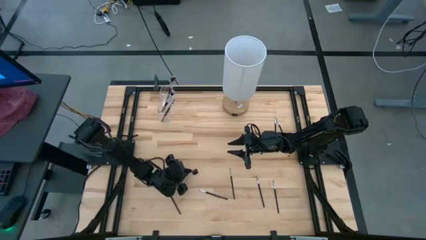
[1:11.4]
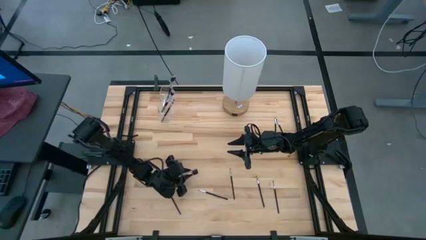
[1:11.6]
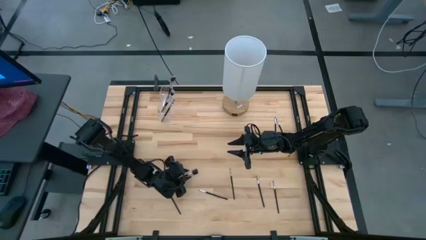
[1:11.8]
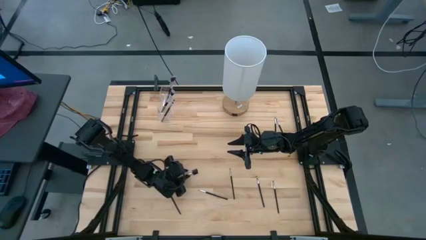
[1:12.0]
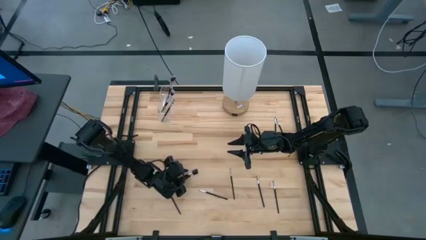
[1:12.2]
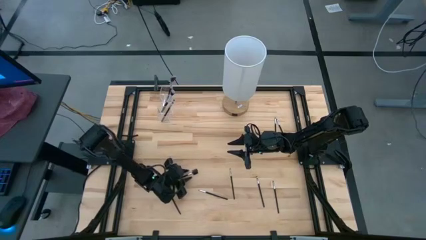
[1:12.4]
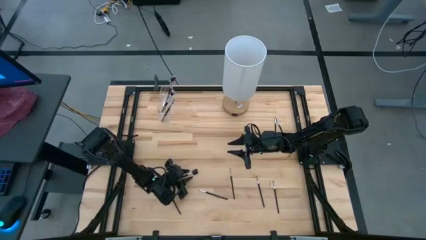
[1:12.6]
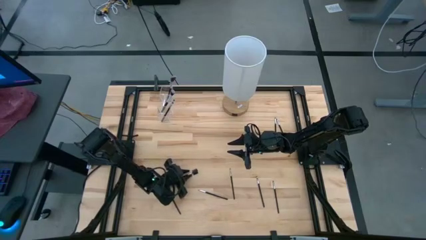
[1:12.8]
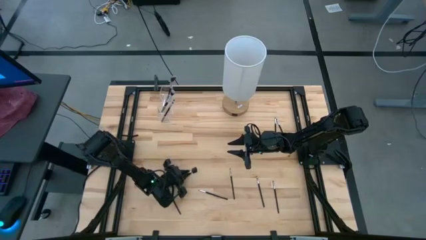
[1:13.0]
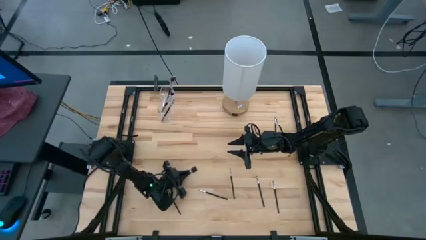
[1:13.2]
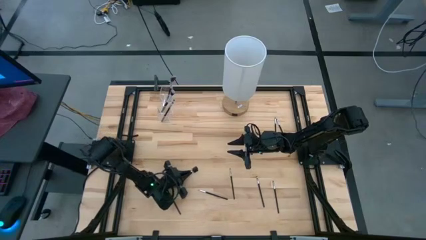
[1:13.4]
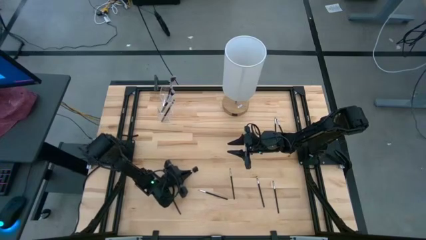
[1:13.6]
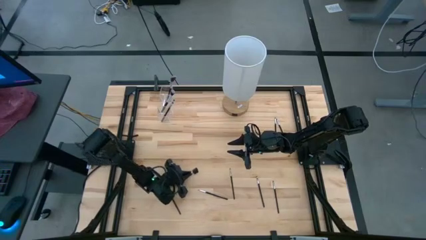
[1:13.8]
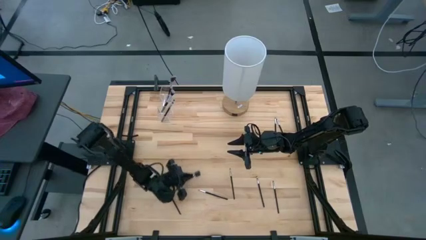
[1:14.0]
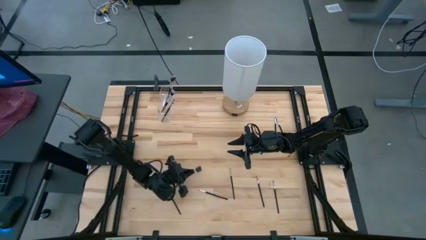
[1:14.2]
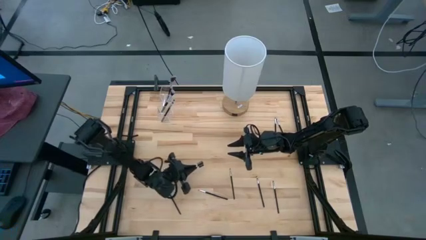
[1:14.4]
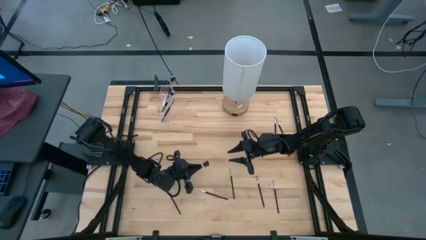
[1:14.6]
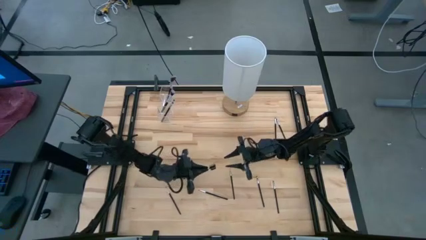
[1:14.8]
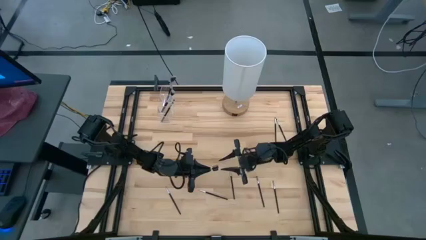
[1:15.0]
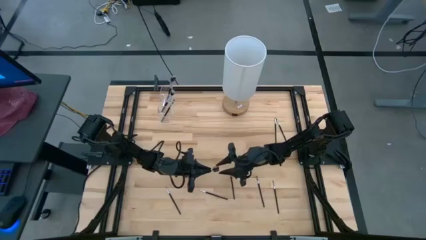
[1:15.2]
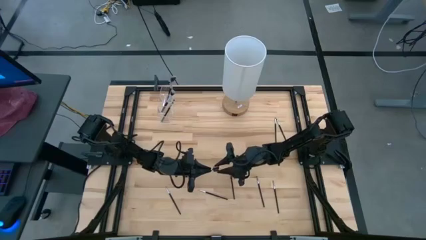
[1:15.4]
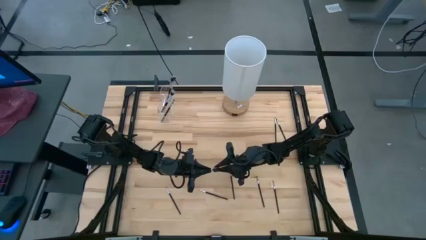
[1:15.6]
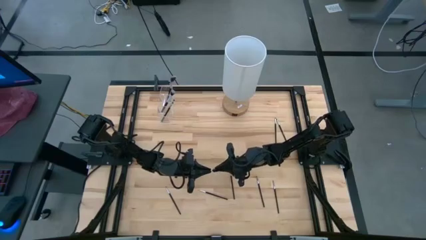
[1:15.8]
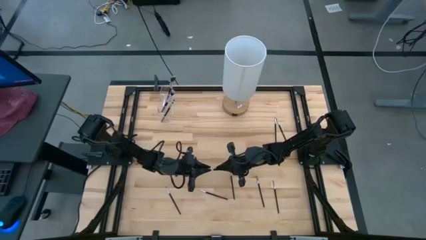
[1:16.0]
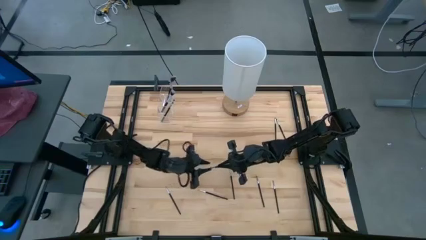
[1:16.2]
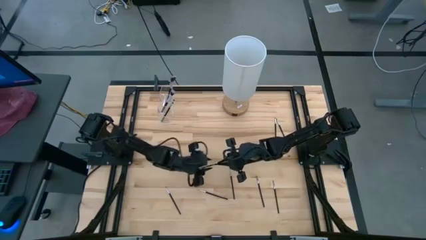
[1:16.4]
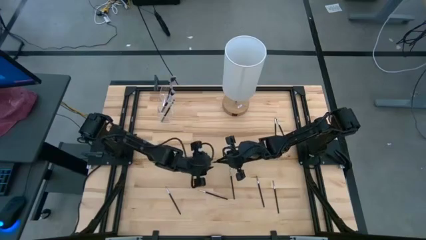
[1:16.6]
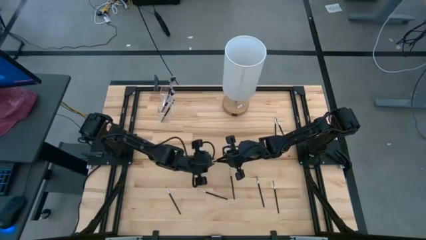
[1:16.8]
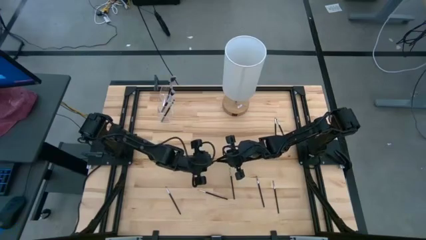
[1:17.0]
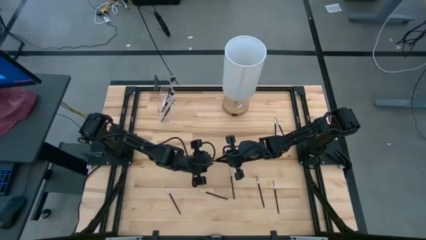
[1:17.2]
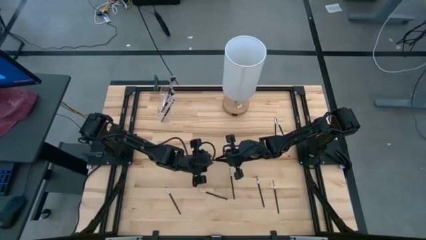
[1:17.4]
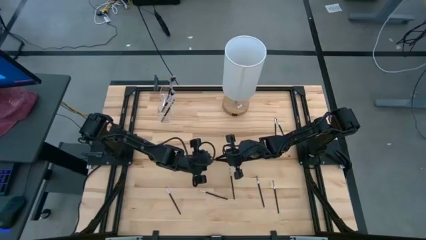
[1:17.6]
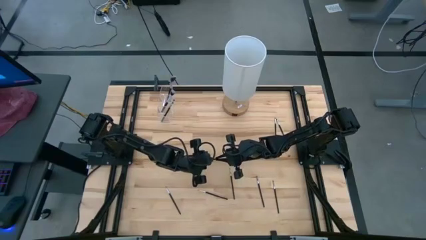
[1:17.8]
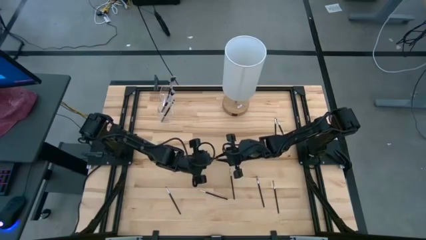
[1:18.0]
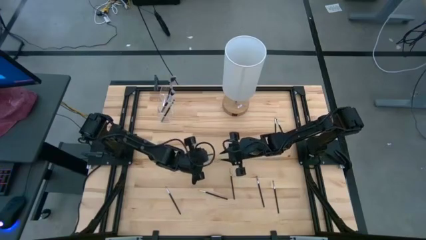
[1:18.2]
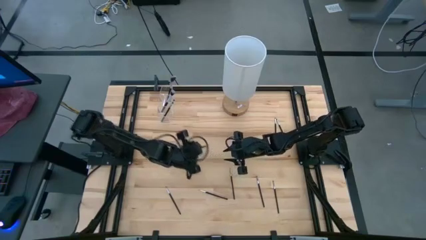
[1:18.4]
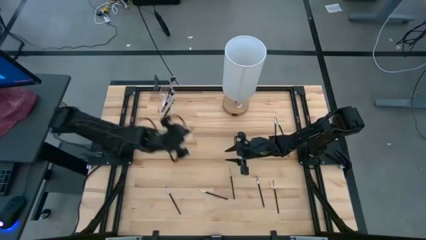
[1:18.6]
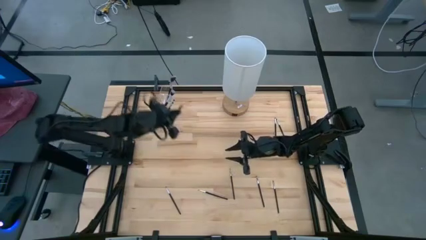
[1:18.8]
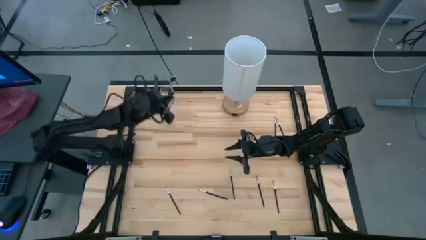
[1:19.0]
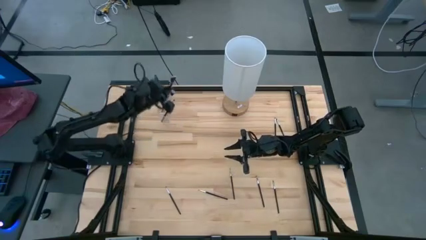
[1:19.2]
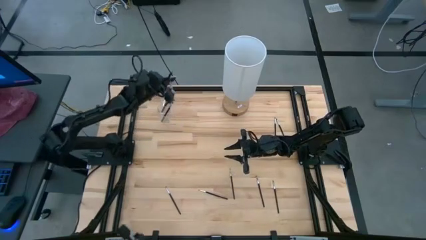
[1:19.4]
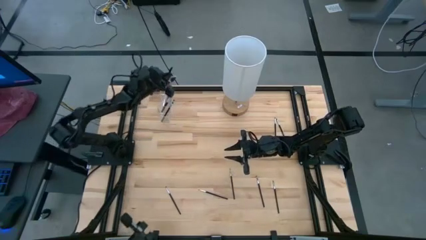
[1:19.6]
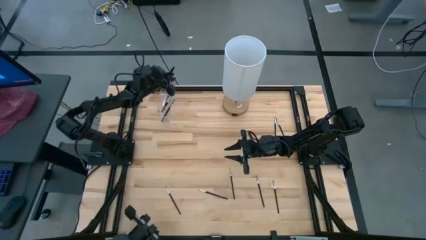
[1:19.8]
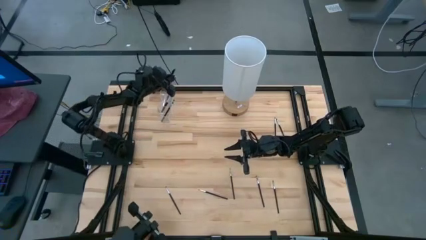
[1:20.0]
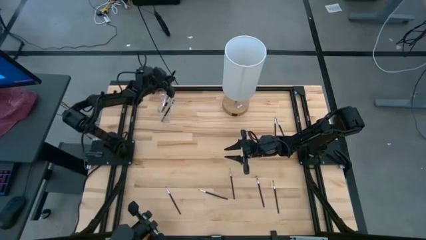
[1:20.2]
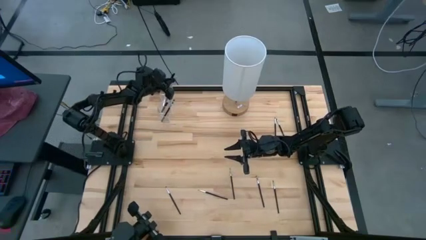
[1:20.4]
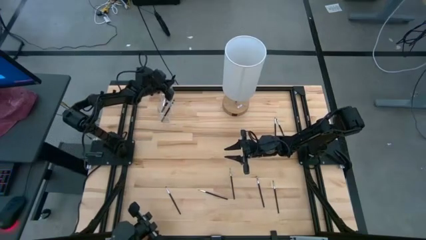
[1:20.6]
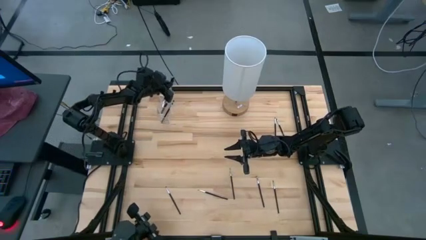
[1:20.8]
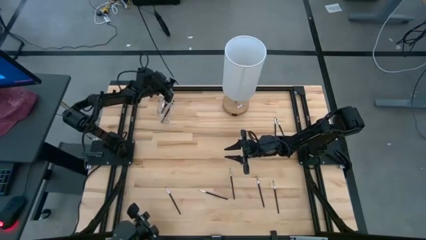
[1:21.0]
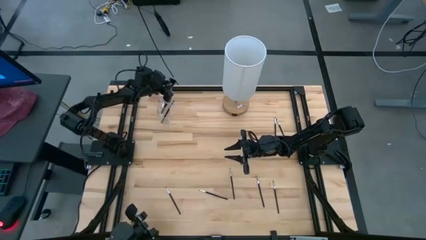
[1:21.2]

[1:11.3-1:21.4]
Task: Put items in baskets/containers
Put the black brow brush into the transparent organizer

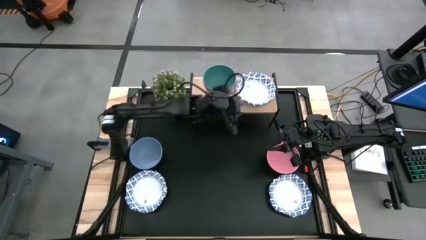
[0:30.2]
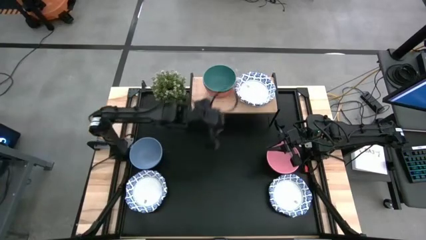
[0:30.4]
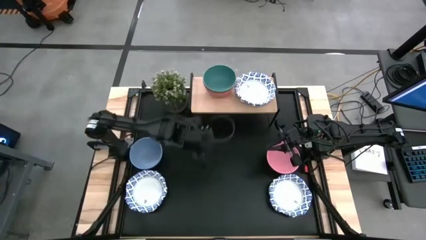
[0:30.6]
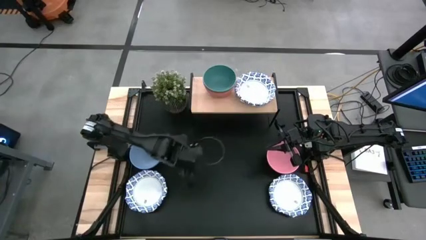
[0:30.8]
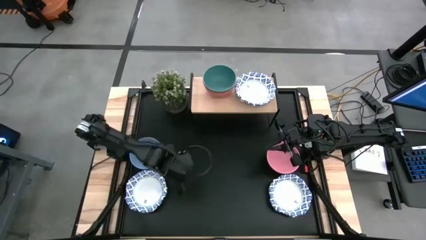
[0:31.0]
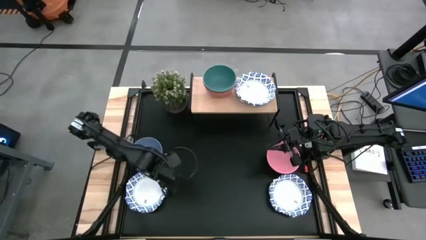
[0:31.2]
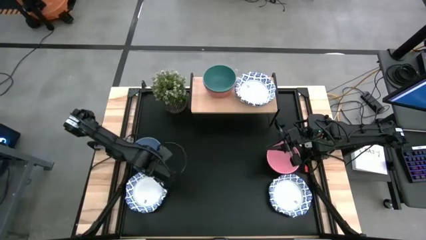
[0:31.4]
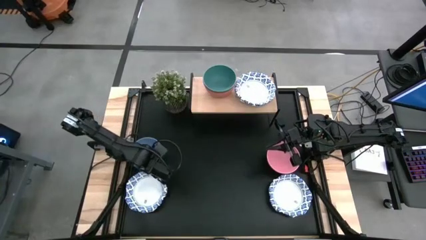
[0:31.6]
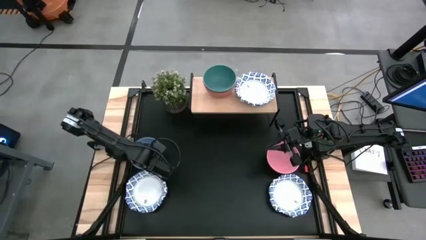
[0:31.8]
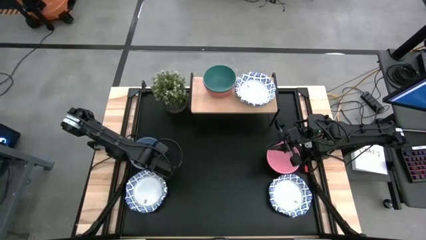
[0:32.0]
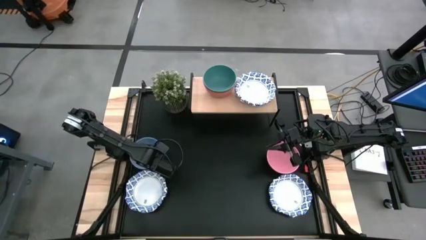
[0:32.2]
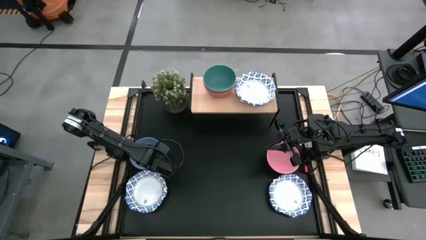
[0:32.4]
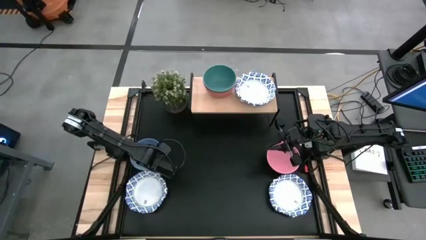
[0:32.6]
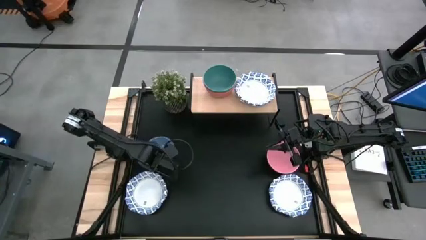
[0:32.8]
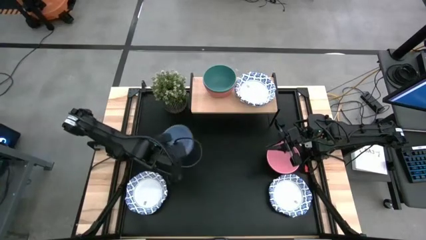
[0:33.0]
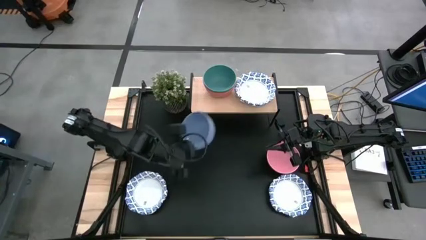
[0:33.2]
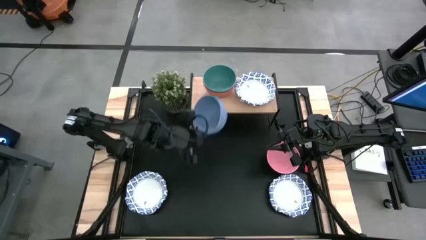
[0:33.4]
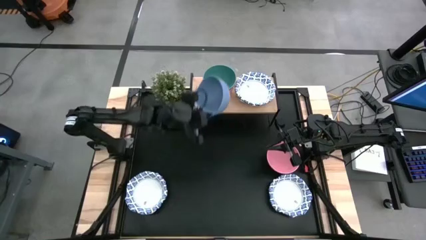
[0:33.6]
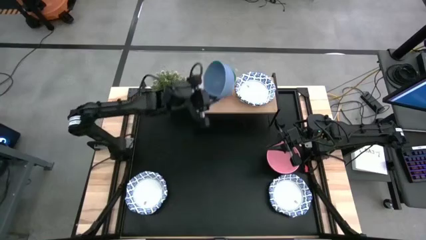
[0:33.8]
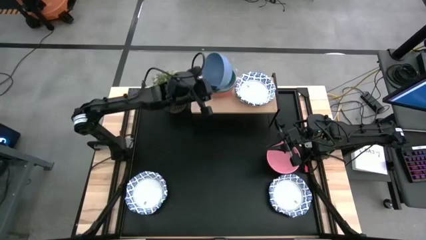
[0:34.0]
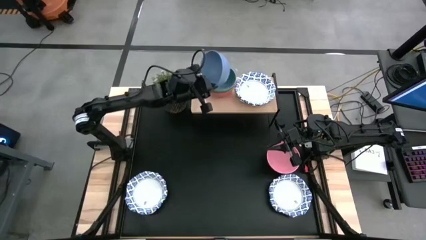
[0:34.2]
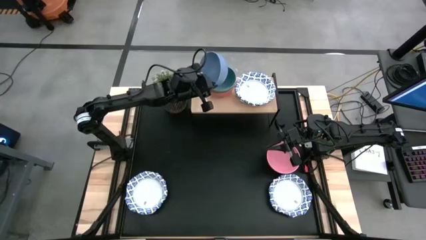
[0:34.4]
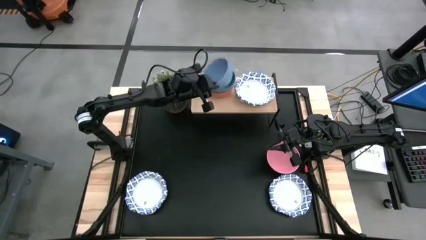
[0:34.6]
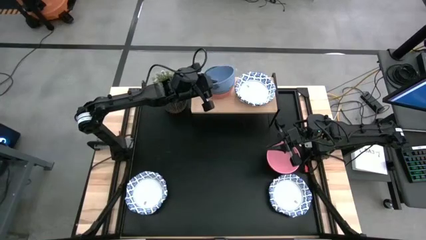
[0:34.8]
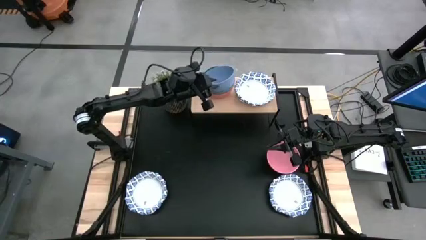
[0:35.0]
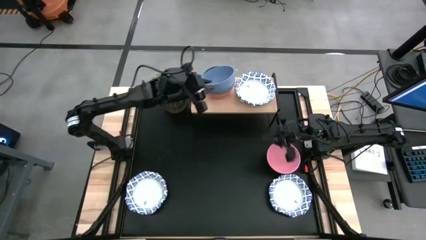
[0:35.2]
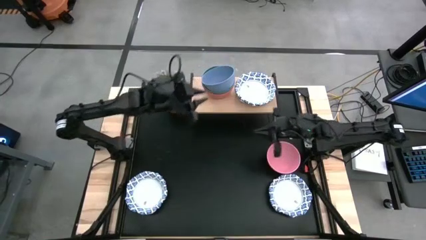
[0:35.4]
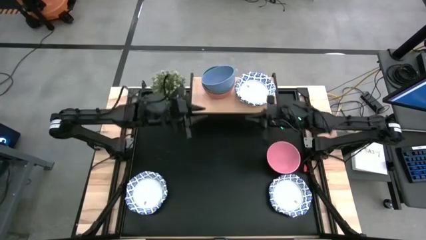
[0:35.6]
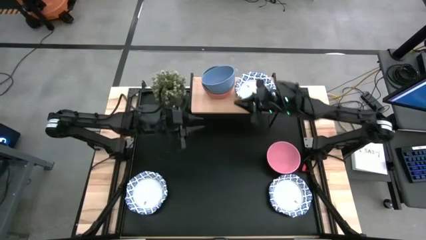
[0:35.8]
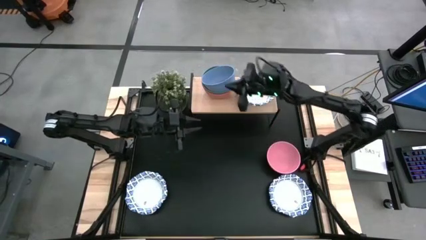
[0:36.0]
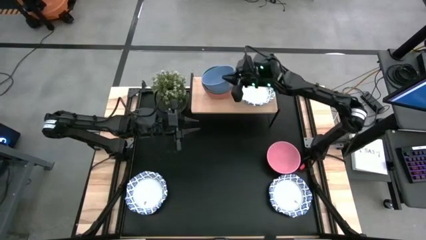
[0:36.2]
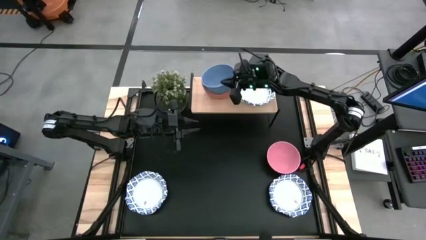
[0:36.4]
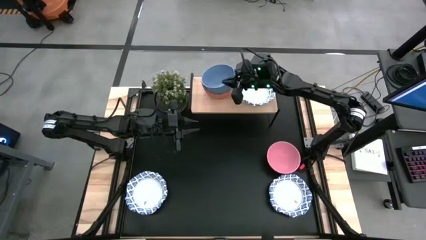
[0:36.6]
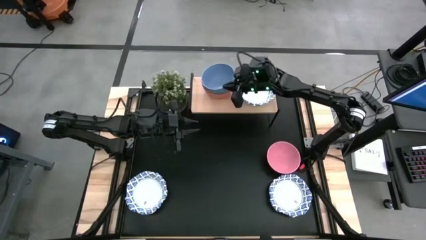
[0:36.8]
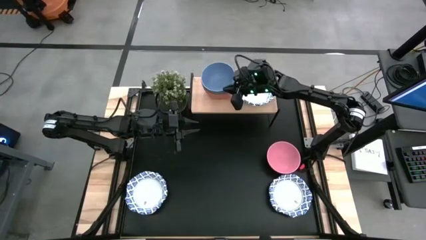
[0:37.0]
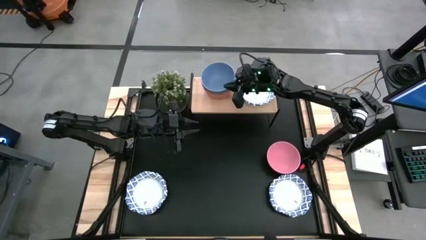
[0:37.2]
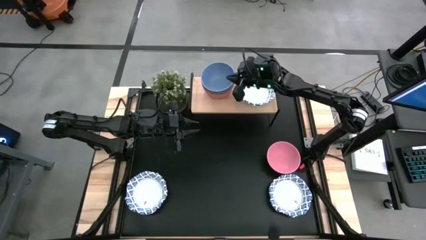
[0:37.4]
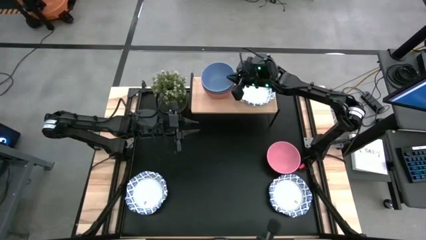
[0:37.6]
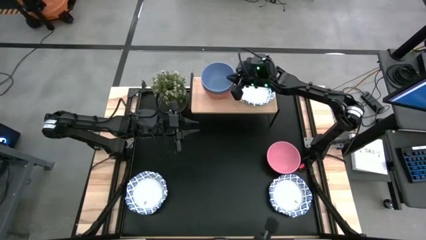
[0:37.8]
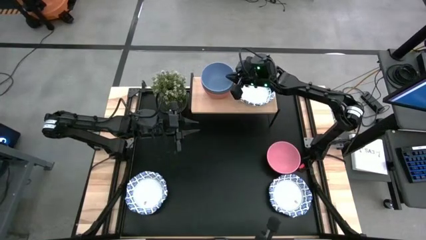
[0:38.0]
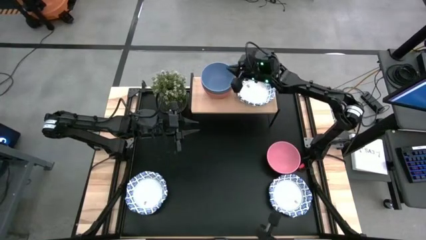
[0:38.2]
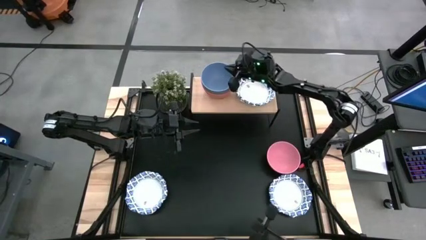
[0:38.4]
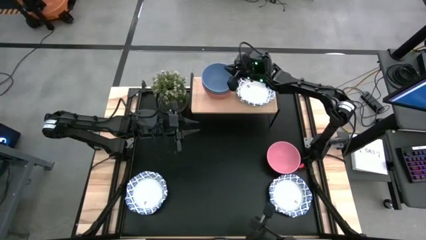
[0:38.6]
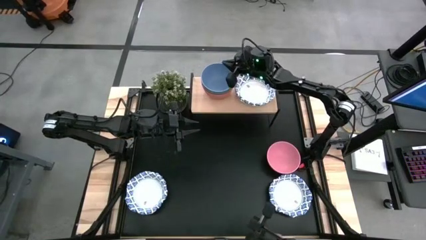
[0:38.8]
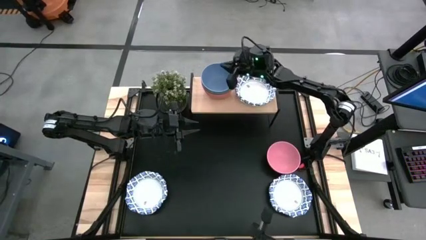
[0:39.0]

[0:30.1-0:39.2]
Task: Place and stack bowls onto a shelf
Stack the blue bowl on top of the green bowl on the shelf
